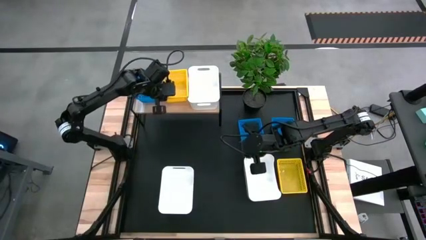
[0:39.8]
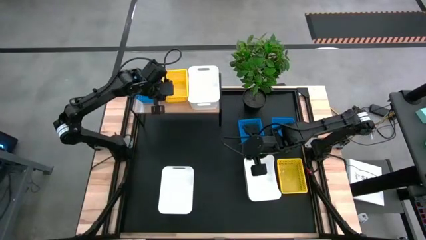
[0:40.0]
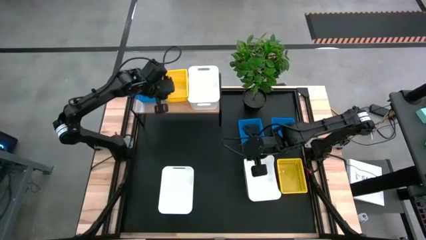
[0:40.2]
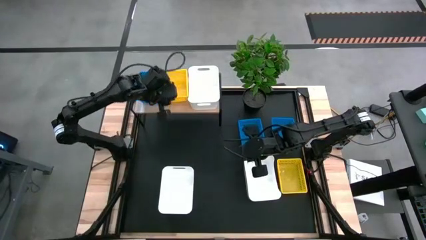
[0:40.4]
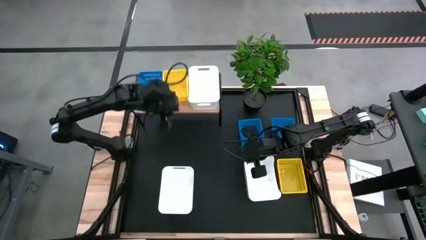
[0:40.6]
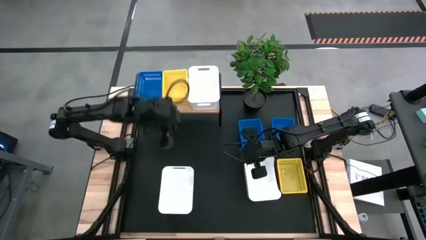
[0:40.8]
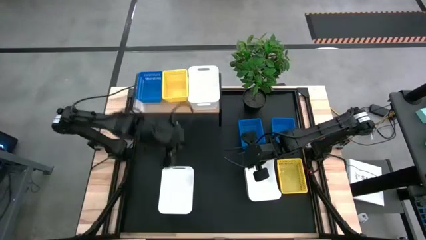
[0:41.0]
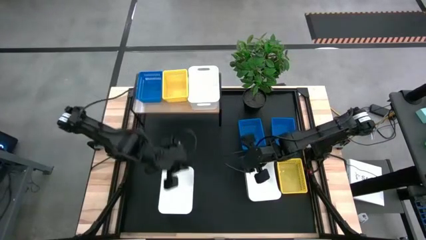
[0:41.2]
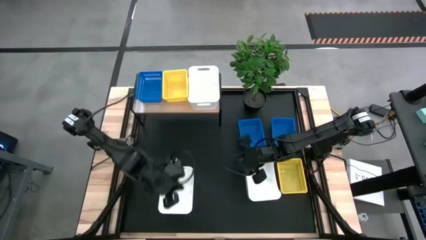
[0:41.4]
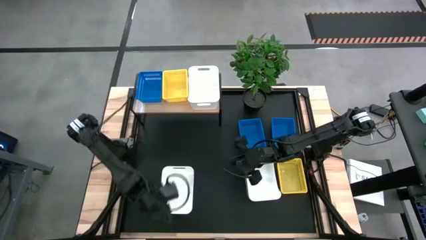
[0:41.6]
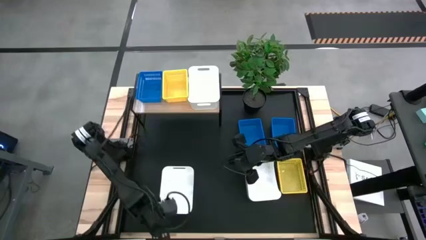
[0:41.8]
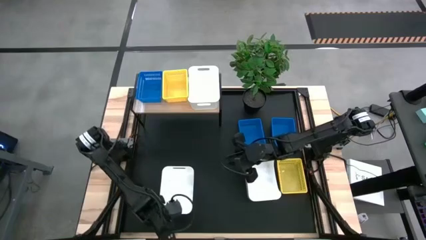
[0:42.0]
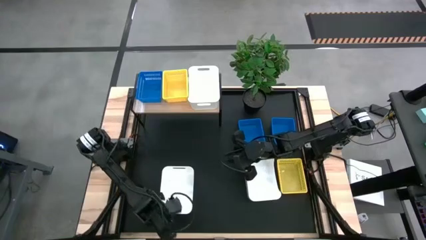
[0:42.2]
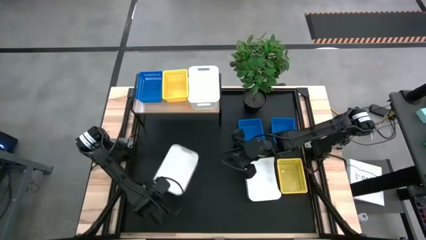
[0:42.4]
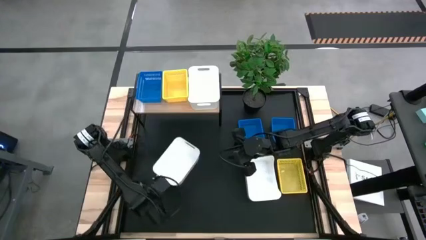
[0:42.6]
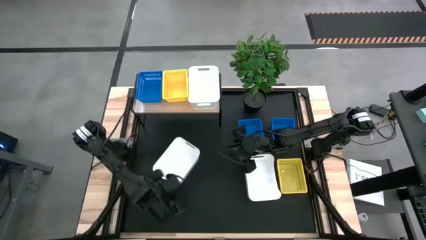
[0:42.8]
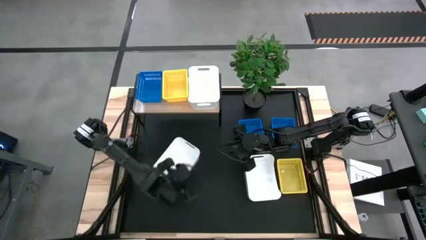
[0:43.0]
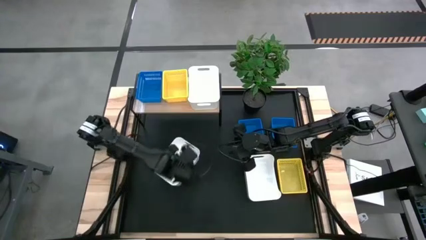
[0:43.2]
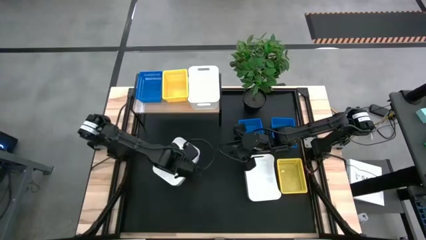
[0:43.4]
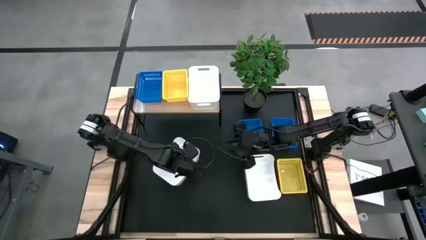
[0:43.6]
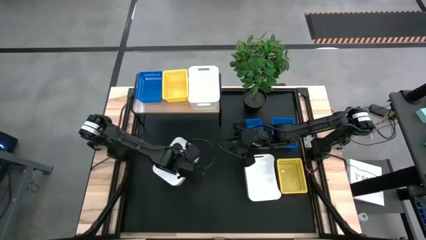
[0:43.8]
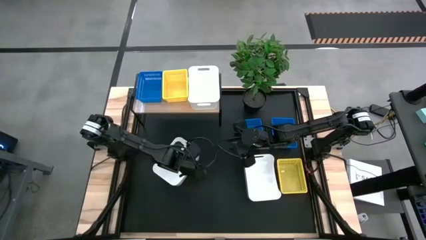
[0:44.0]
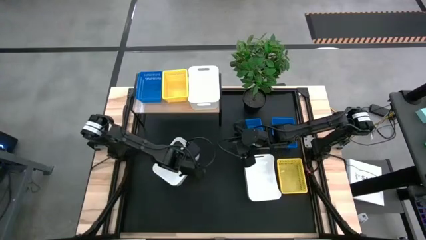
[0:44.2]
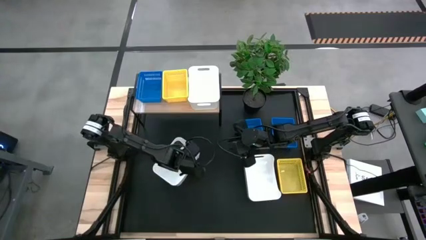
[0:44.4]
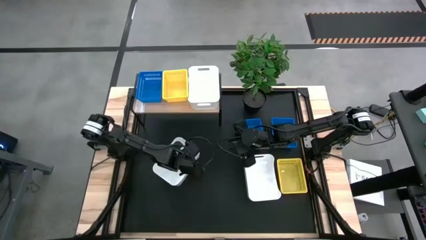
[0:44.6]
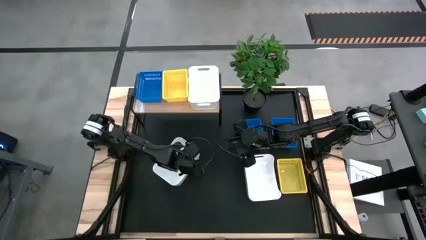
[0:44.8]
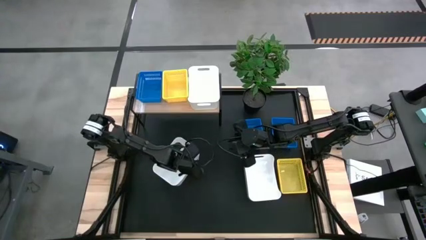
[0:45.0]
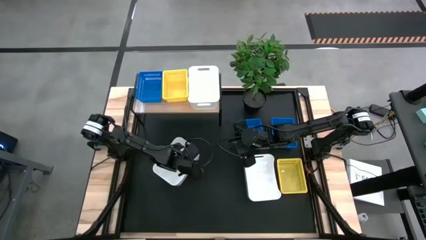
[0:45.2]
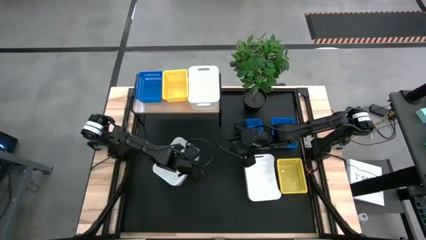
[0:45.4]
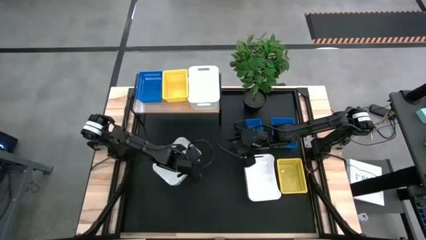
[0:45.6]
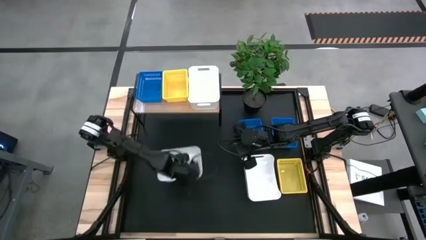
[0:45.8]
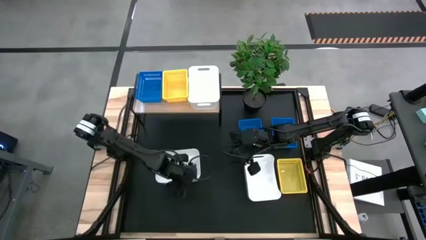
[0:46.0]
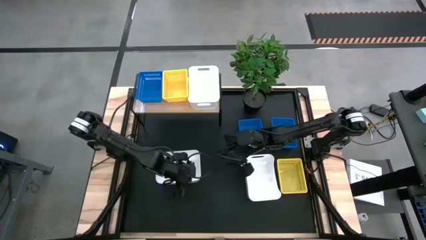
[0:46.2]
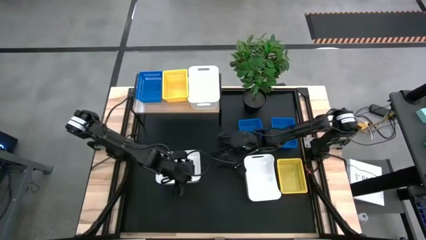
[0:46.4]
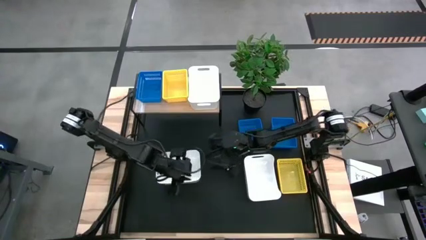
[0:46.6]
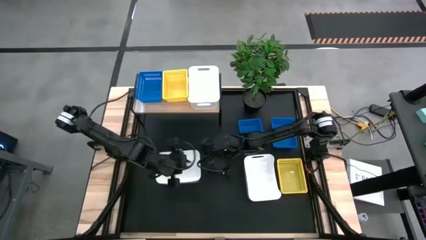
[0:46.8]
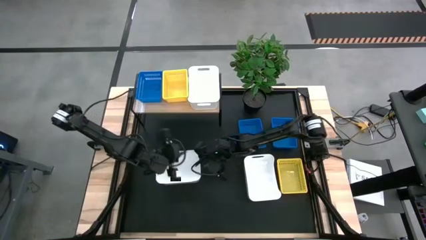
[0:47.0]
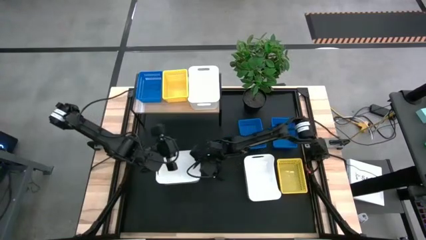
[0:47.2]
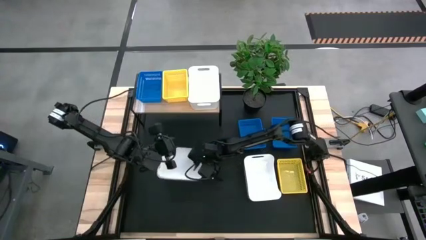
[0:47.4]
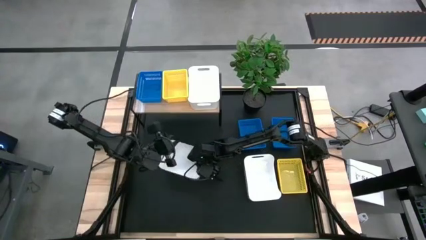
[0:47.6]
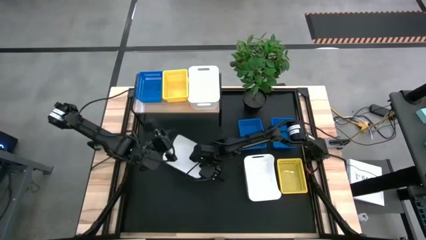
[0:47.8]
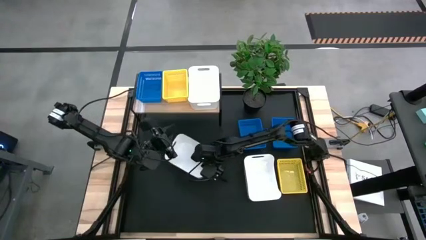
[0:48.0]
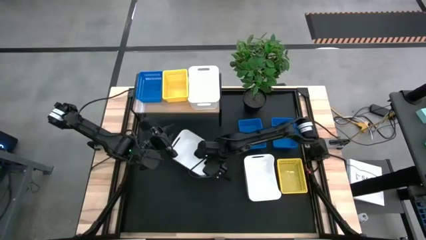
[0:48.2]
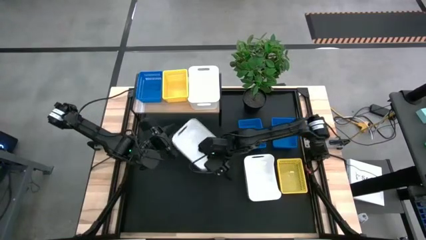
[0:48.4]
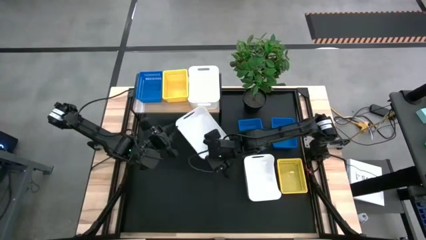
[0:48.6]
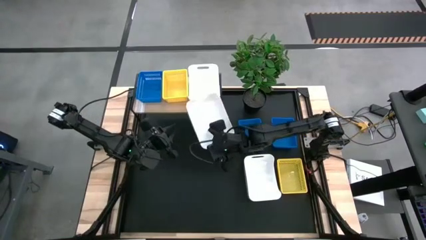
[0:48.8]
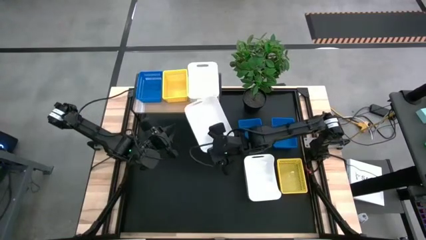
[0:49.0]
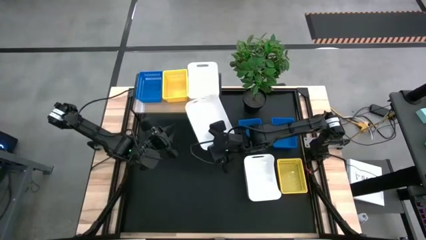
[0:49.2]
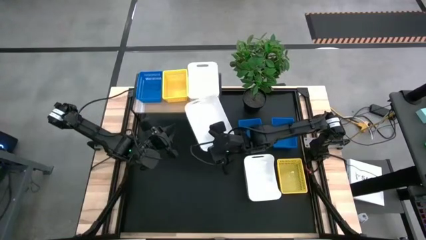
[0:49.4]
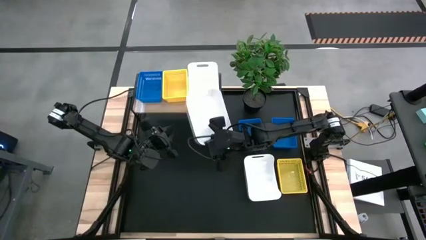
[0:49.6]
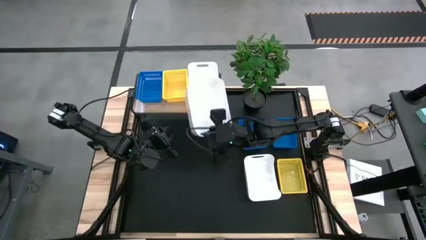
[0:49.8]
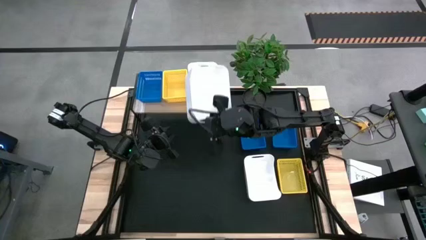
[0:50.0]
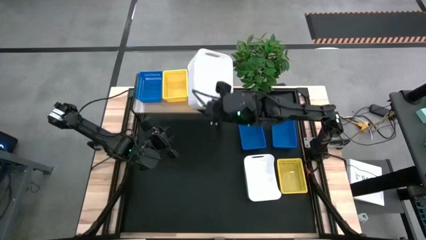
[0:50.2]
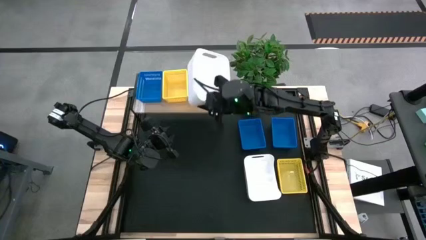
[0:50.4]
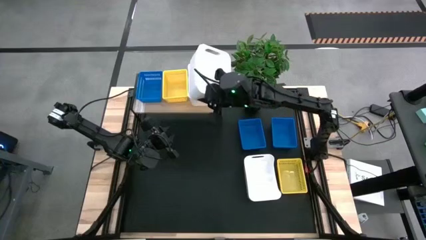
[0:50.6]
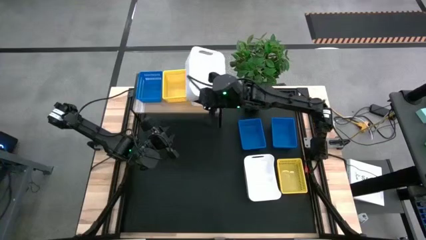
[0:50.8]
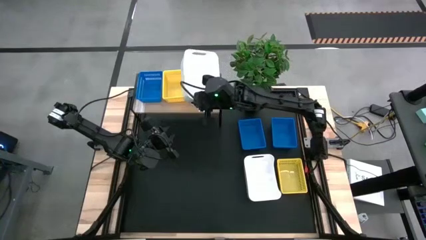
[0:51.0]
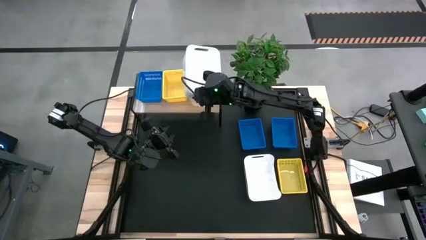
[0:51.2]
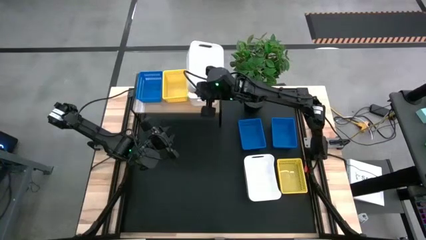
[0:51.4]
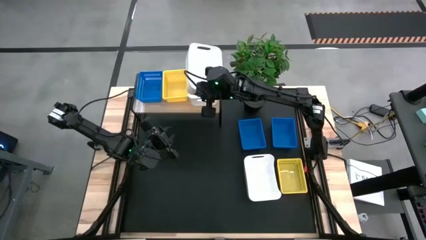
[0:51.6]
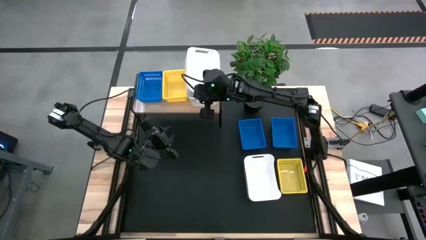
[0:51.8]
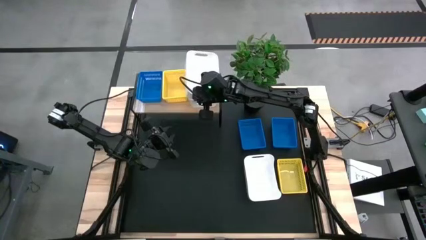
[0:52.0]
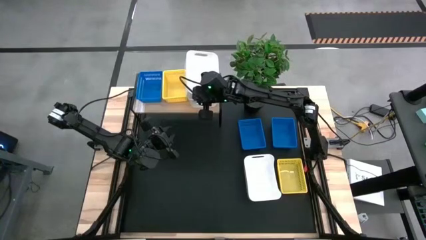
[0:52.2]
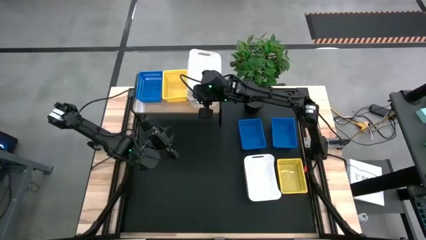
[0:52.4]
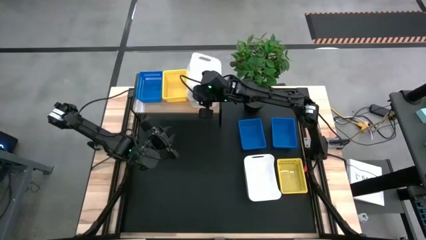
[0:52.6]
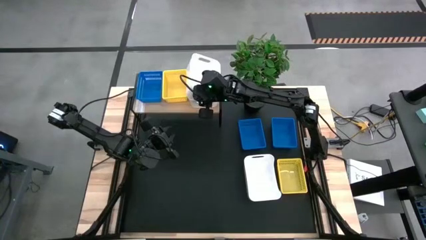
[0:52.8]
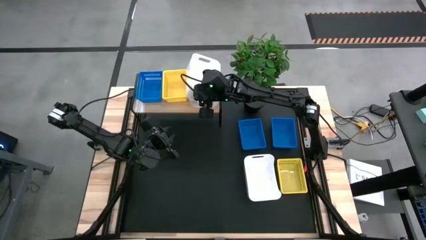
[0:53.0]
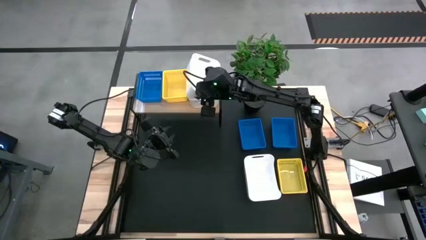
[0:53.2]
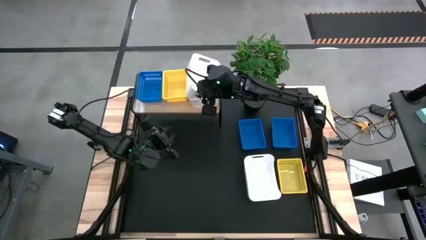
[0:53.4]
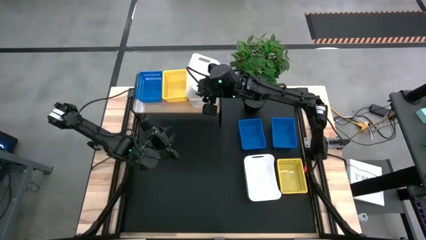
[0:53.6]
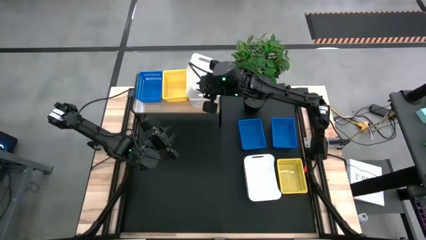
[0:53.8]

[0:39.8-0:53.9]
Task: Stack baskets on shelf by color
Stack the left white bin into the white bin on the shelf

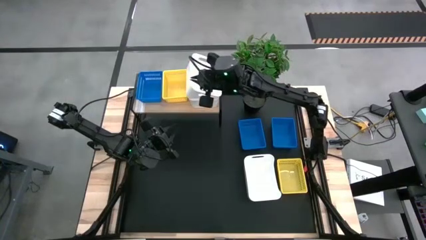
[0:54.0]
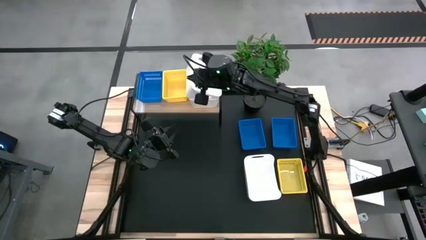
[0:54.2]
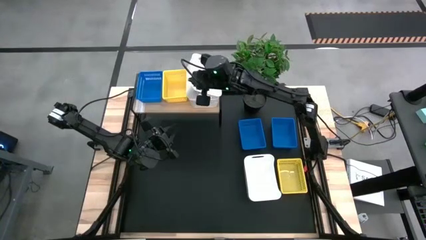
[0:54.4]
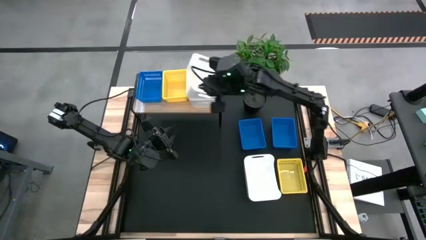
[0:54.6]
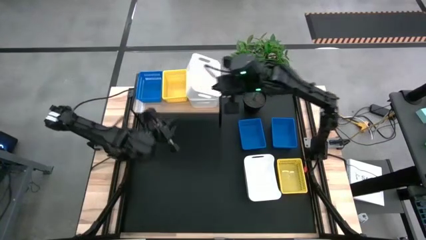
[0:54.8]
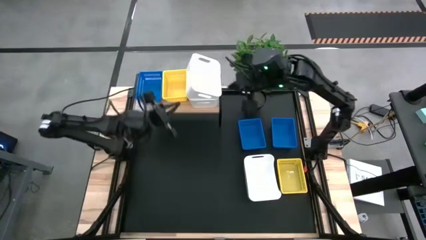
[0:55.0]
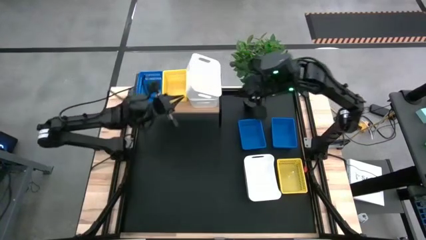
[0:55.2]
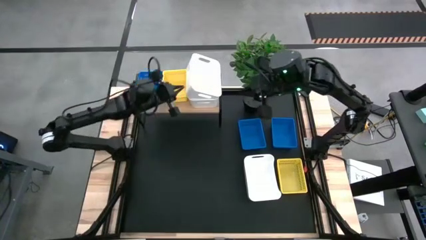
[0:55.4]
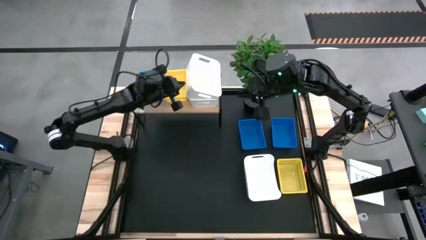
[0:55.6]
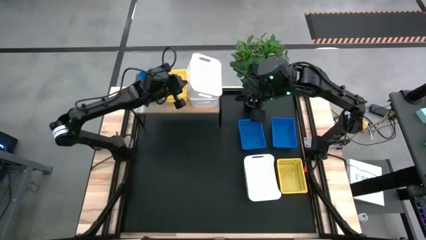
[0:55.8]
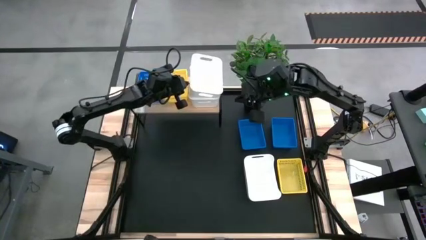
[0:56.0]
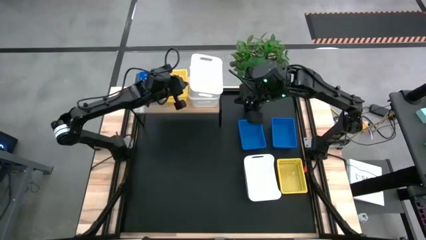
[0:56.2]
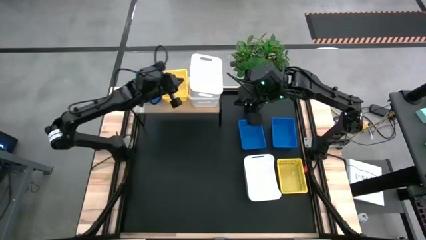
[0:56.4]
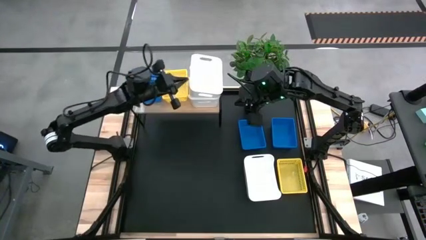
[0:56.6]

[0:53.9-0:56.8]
Stack the left white bin into the white bin on the shelf
